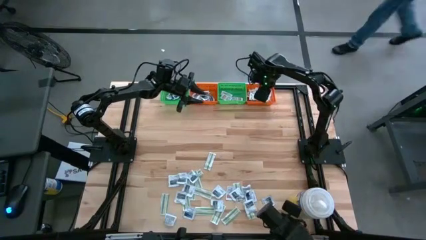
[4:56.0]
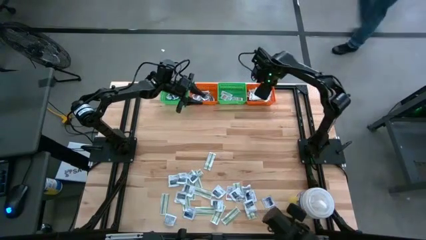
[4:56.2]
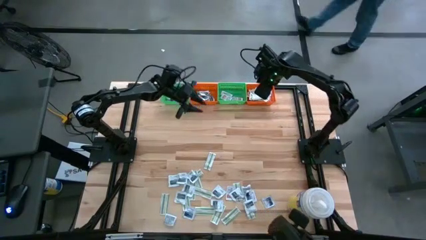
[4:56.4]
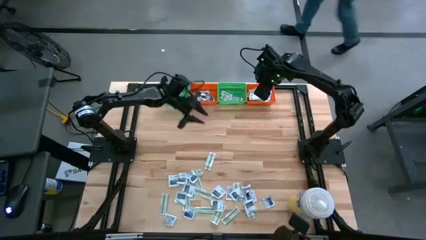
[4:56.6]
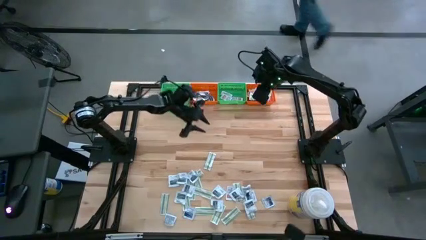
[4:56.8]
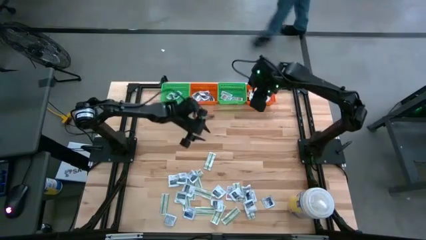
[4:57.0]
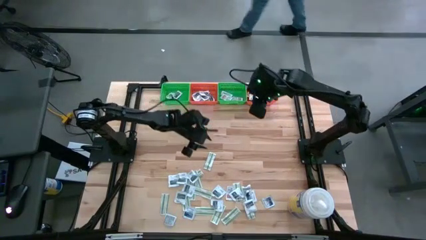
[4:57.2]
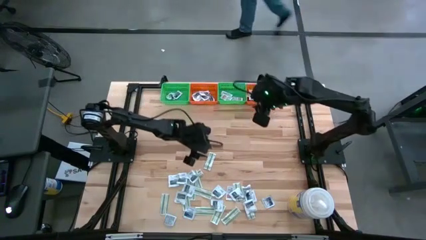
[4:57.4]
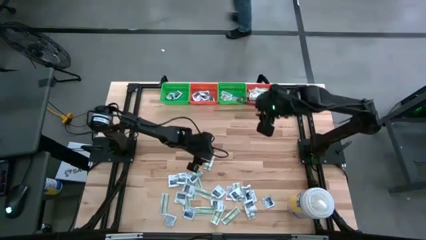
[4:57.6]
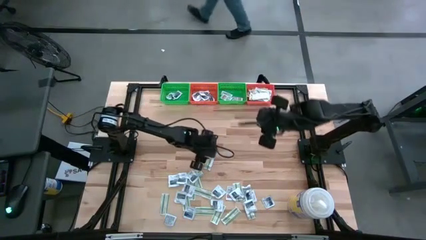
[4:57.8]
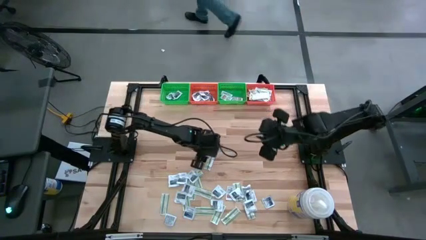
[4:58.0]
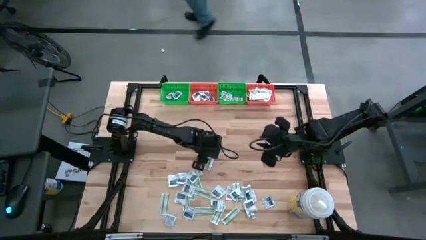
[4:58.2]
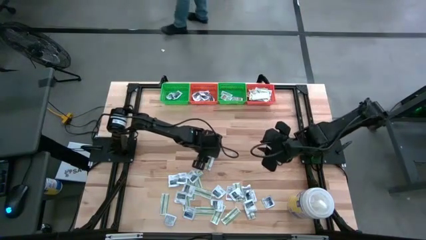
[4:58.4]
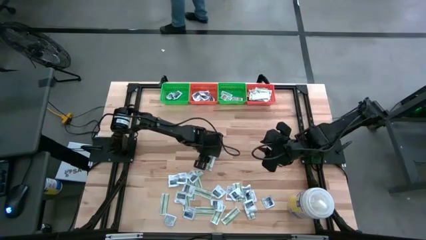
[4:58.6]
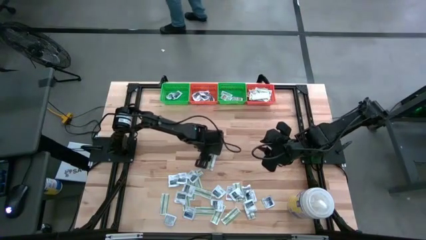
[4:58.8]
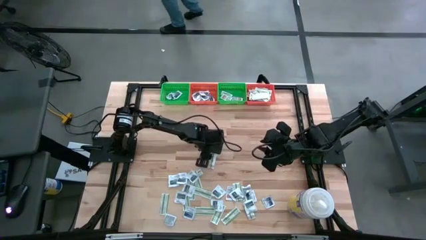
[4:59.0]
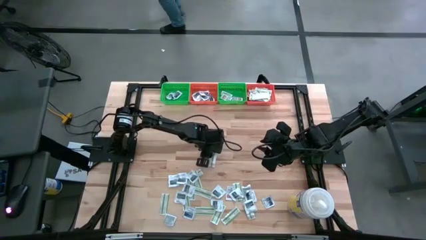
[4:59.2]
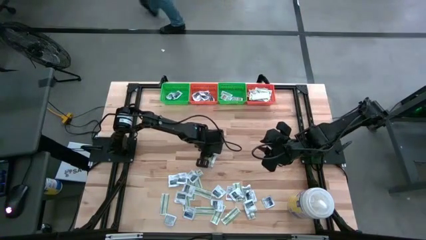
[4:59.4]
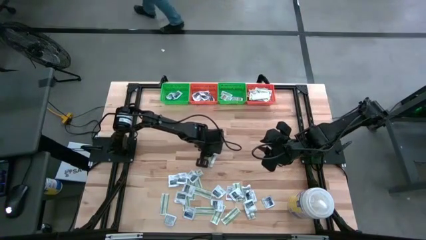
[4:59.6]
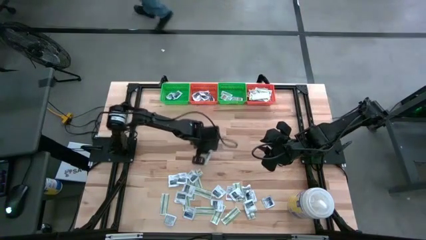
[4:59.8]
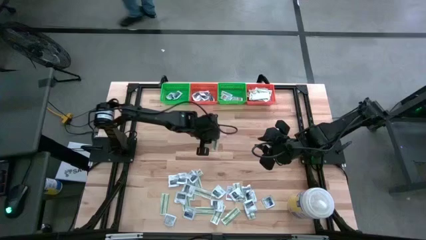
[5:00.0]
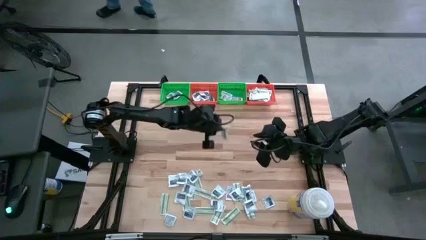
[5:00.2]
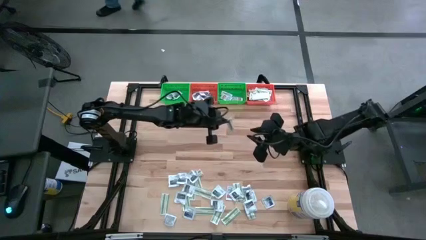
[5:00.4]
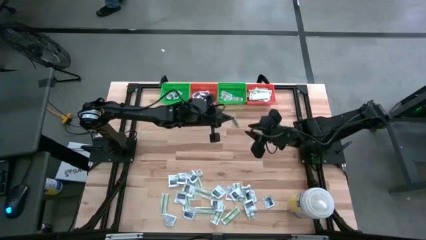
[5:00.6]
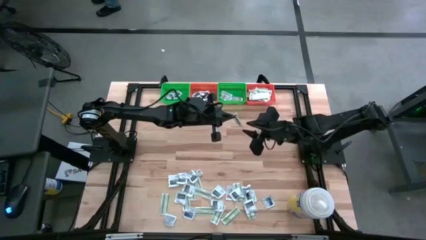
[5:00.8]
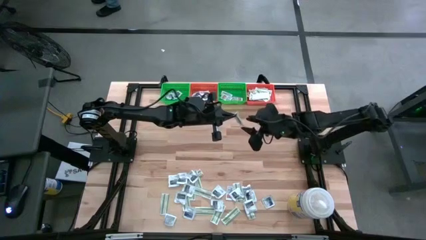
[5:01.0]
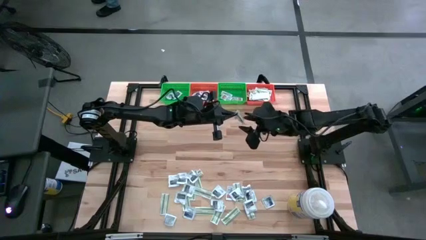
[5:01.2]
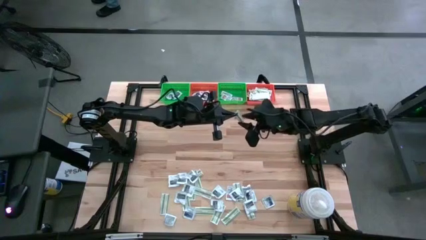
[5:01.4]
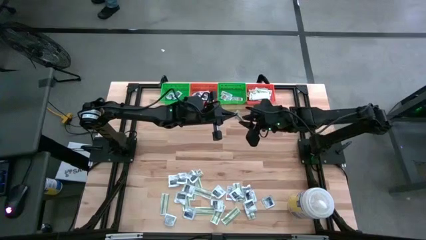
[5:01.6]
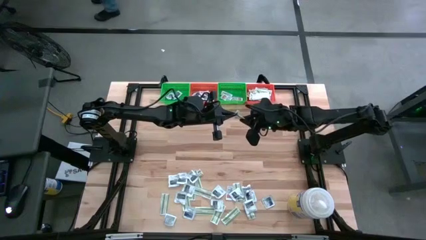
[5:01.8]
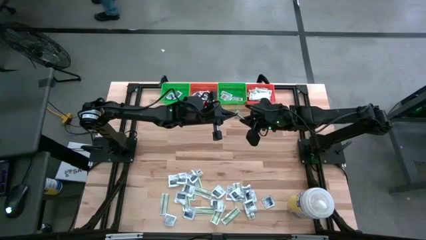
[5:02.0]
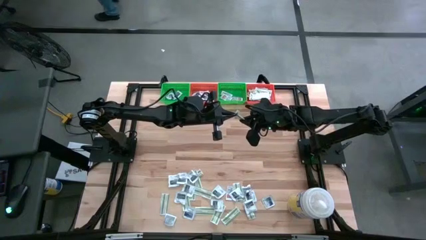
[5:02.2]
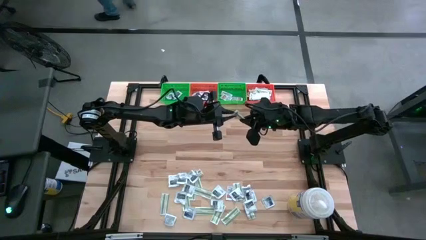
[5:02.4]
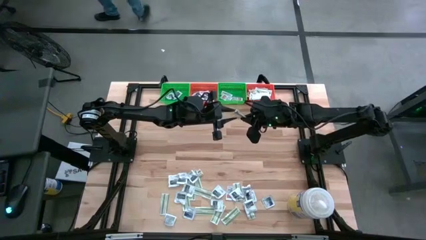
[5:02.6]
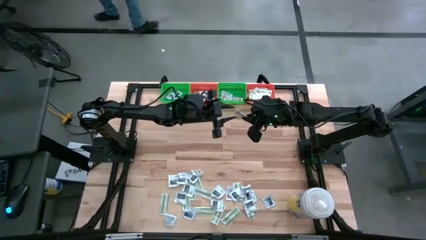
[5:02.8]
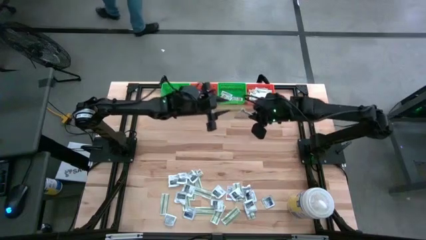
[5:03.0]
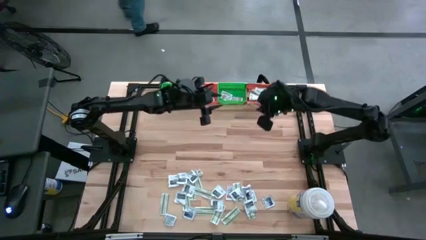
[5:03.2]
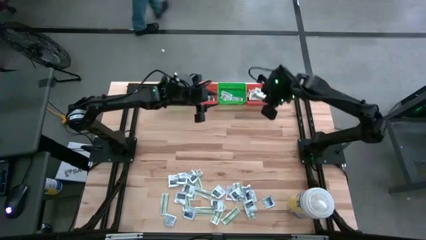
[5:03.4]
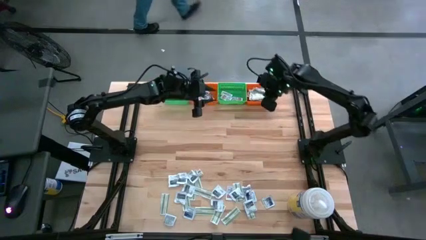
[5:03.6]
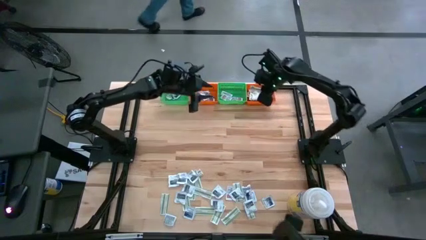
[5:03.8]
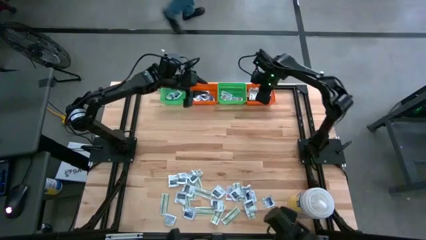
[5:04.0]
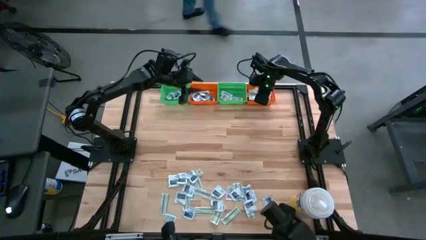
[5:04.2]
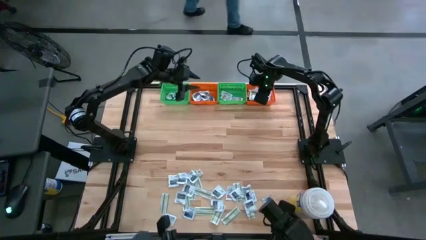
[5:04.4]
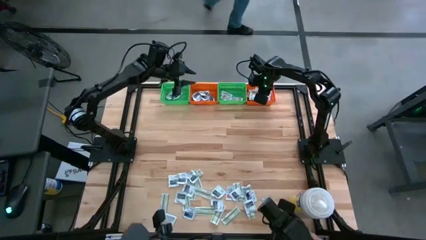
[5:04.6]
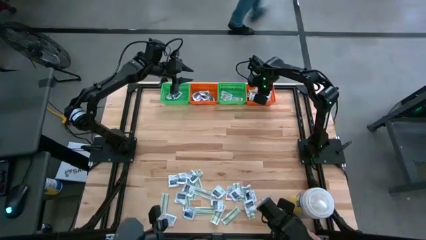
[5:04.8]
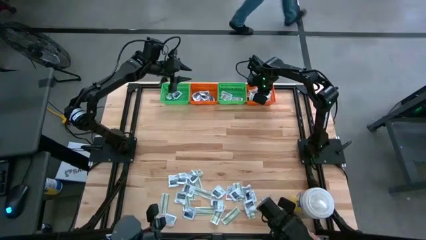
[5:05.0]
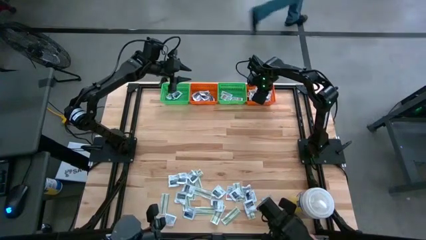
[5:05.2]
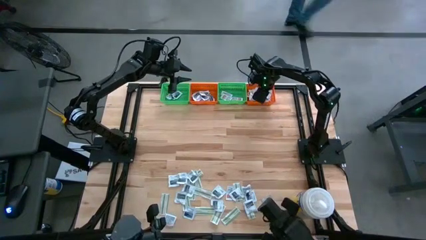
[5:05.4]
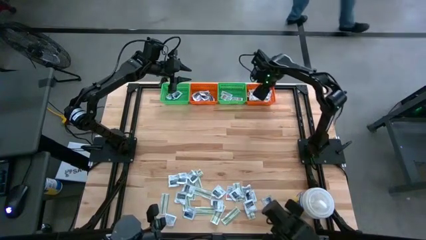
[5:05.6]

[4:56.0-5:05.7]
Task: Pick & Place First Aid Supplies
Put the green bandage pack in the right orange bin

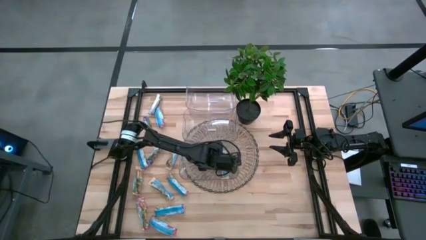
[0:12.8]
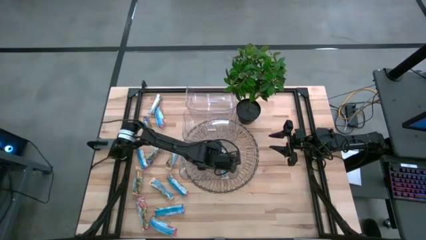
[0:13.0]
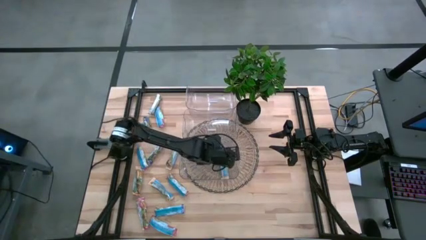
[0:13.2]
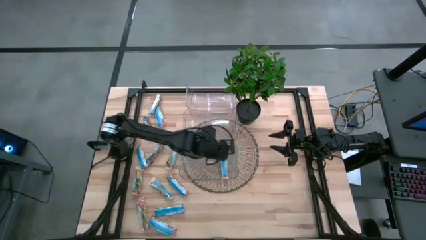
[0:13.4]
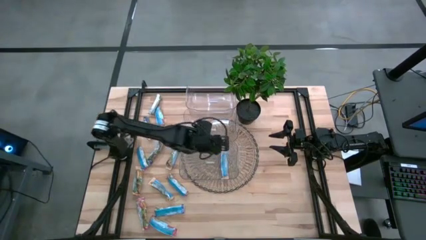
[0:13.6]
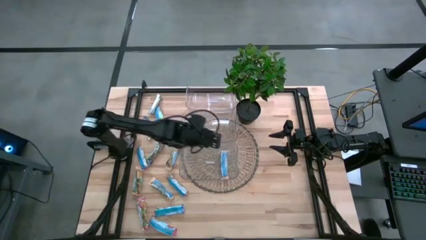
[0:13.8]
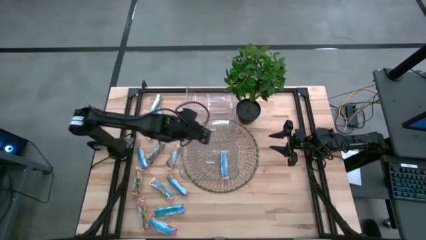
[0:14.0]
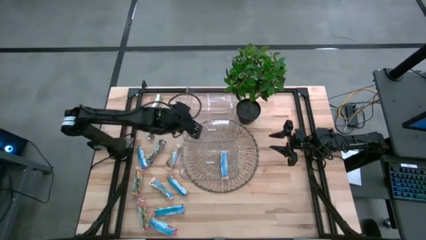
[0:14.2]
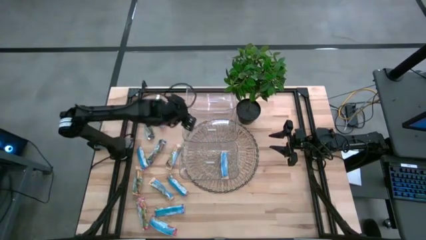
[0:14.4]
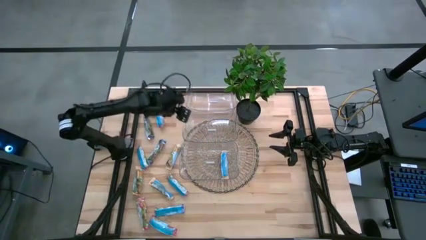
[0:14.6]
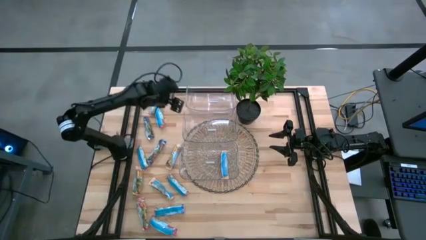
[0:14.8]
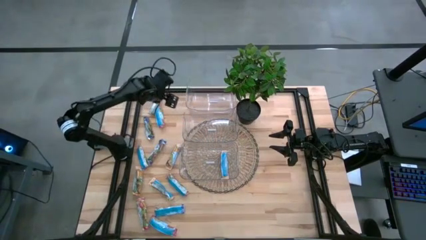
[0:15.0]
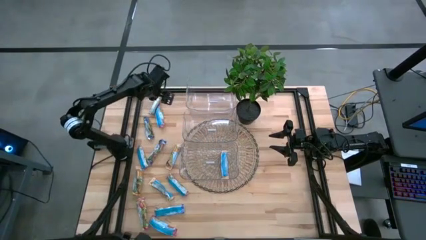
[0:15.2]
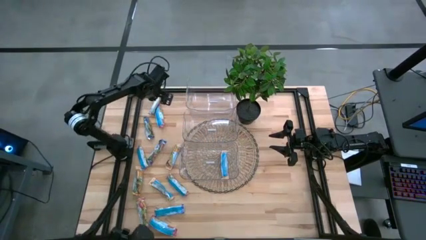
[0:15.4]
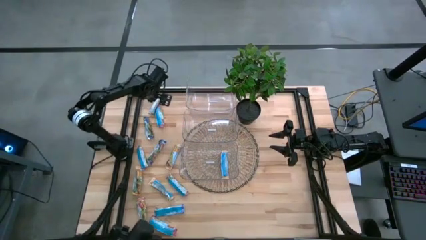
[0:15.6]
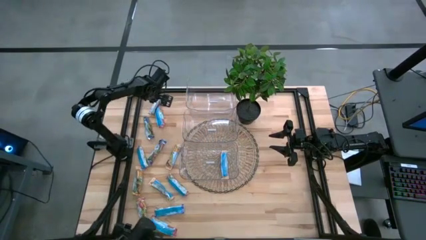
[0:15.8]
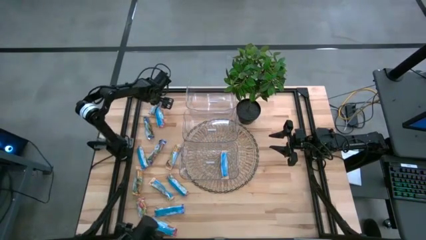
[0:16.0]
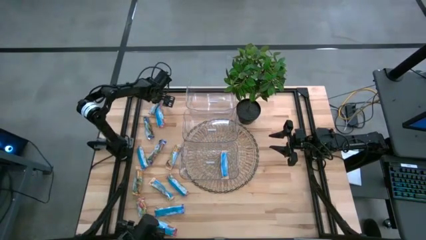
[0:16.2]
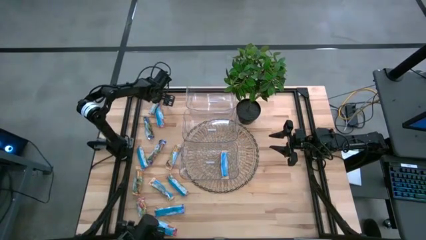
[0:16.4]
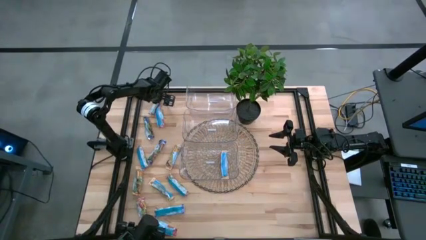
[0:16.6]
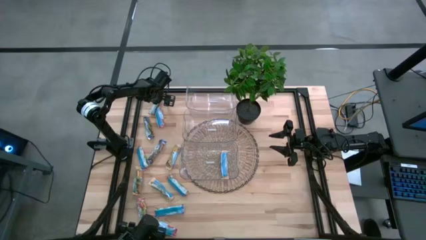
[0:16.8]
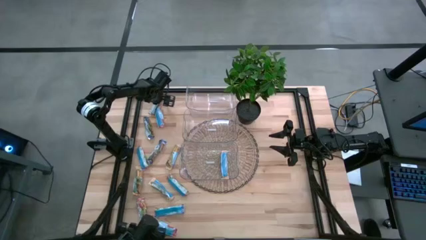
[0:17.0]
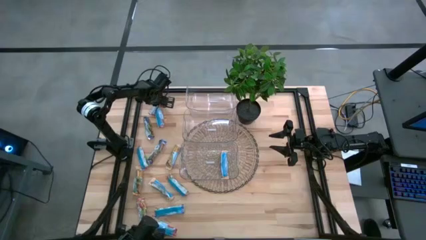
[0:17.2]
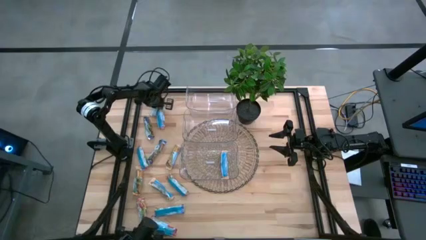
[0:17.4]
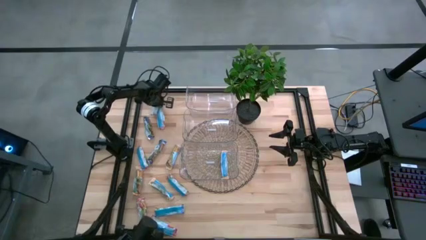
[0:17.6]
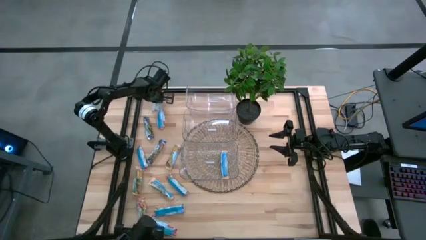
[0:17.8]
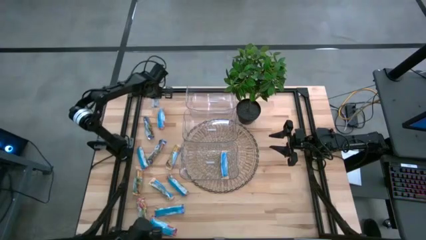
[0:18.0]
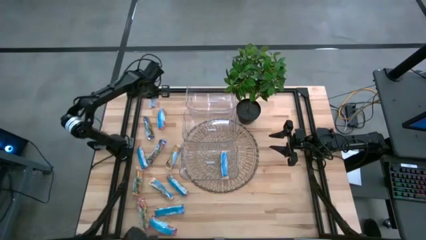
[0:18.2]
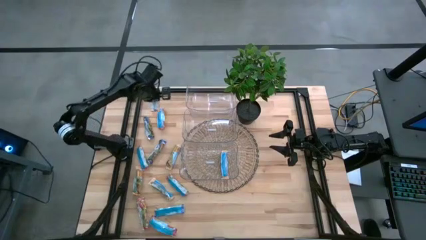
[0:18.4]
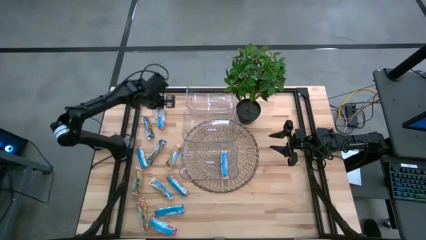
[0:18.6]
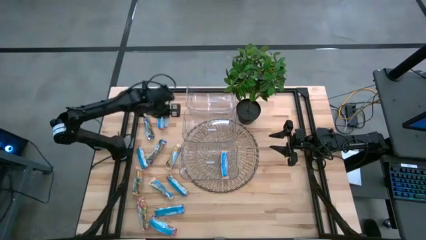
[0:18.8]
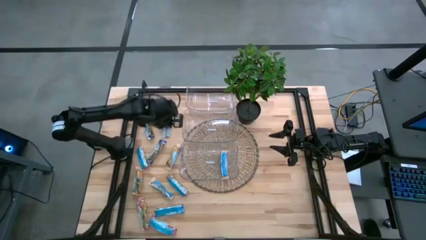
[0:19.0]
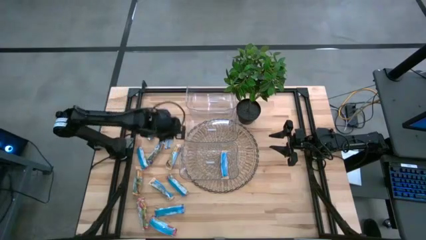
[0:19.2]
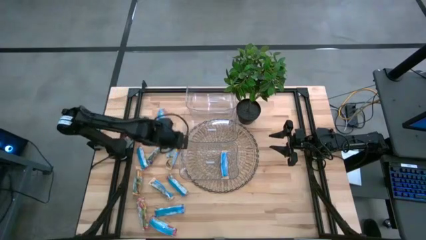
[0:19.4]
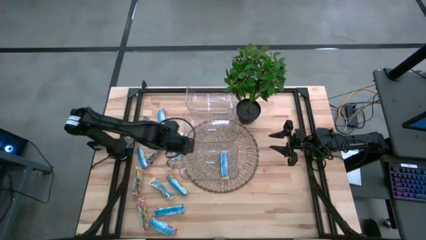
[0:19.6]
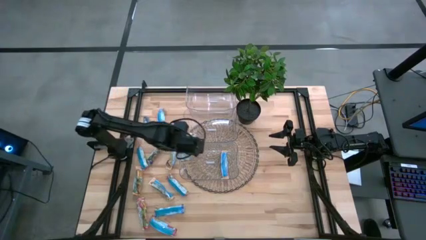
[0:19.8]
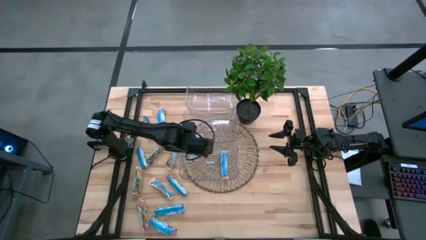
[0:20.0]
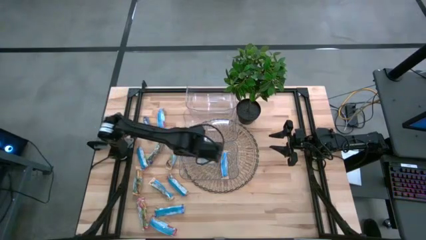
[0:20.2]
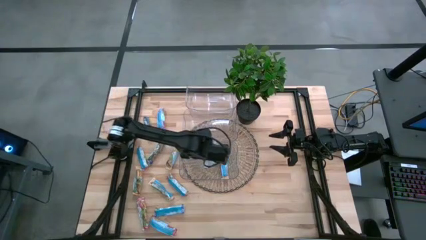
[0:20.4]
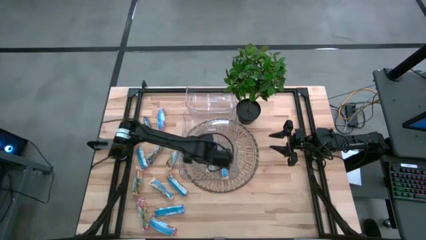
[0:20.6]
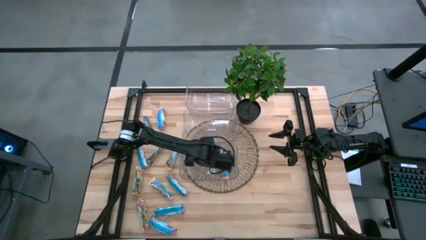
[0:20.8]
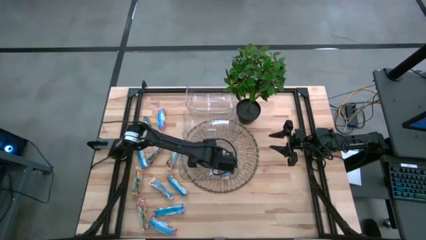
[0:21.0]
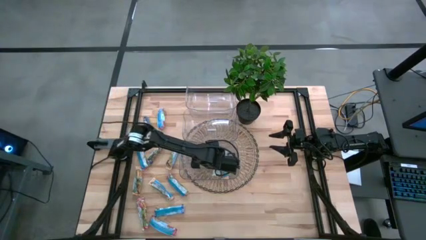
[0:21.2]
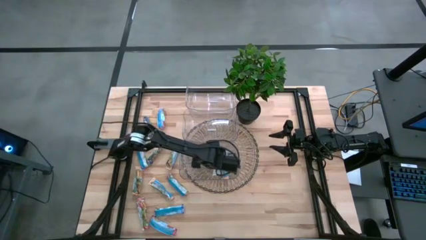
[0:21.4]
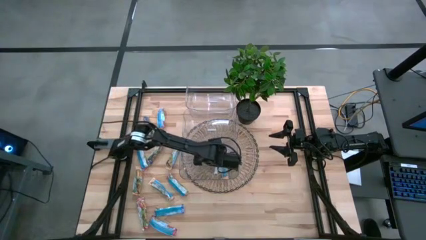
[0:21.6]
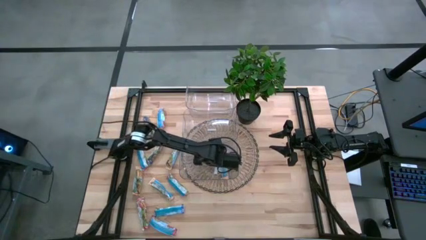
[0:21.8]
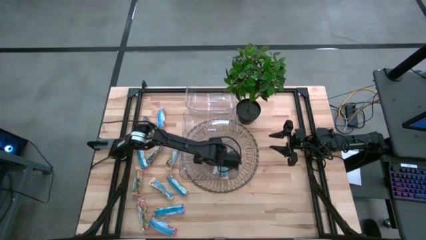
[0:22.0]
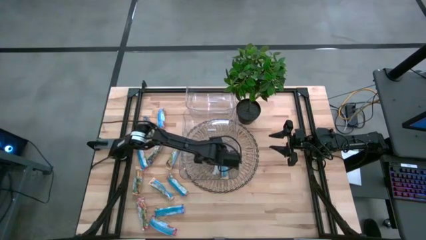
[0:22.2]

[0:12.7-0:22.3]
Task: Pick and place Granola Bars by type
Put the yellow granola bar into the bottom transparent bin
